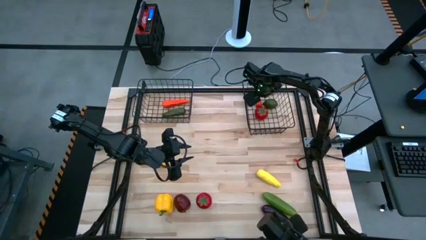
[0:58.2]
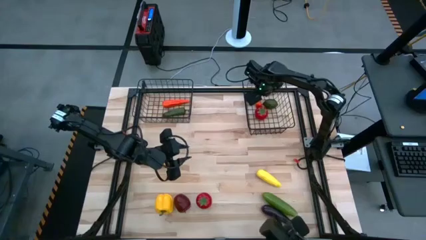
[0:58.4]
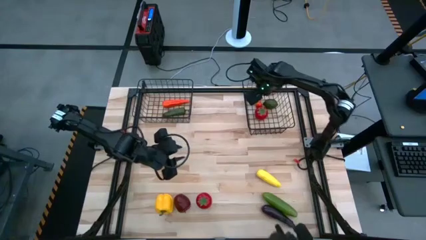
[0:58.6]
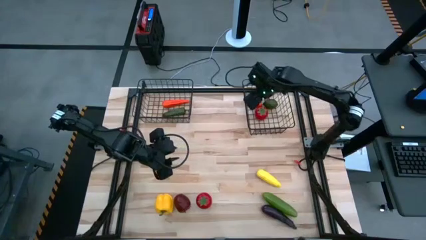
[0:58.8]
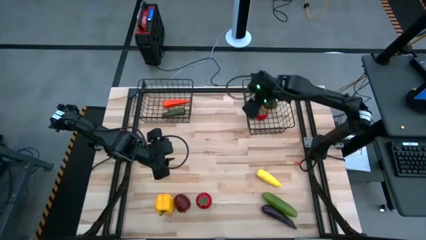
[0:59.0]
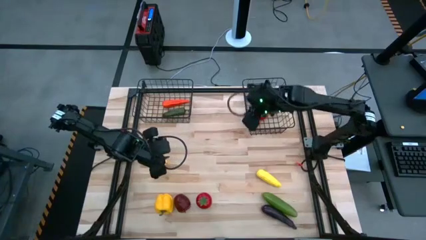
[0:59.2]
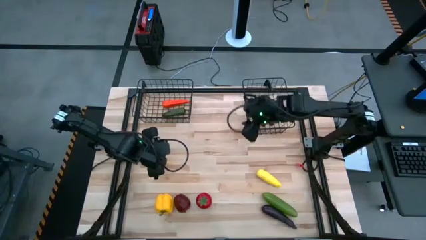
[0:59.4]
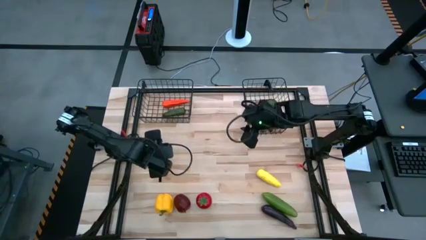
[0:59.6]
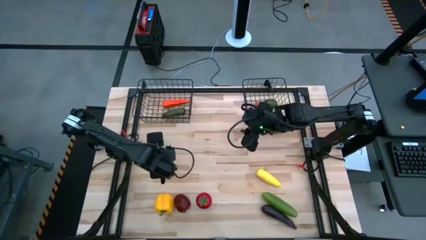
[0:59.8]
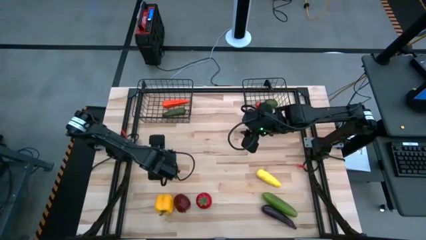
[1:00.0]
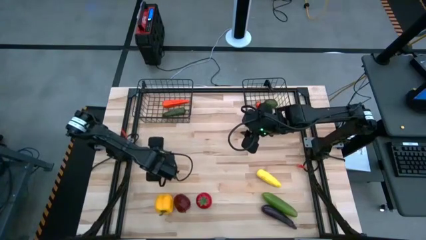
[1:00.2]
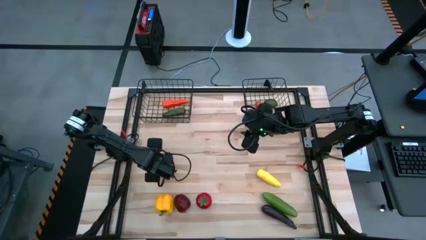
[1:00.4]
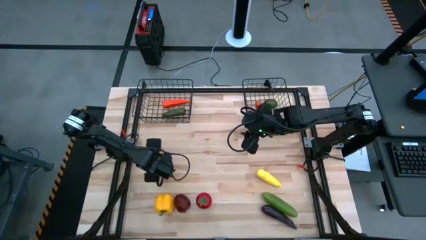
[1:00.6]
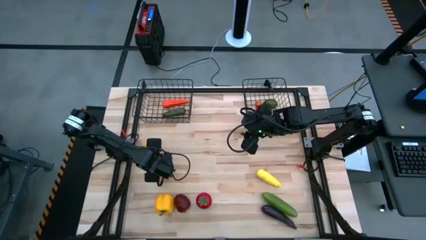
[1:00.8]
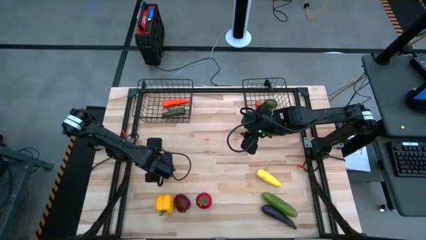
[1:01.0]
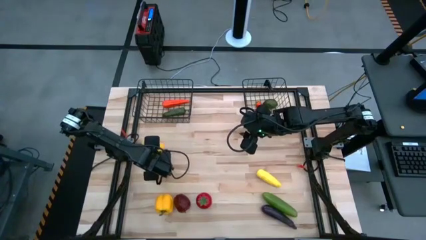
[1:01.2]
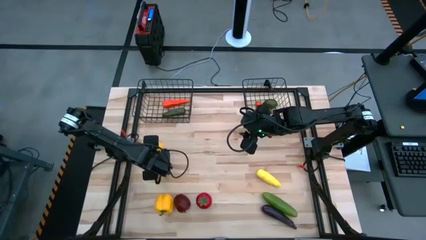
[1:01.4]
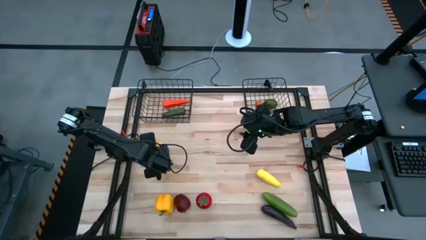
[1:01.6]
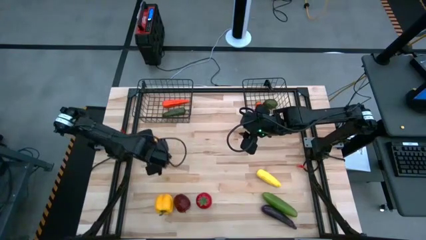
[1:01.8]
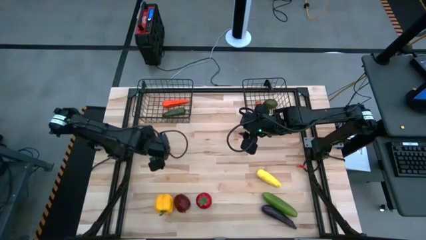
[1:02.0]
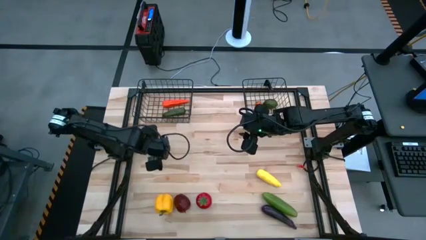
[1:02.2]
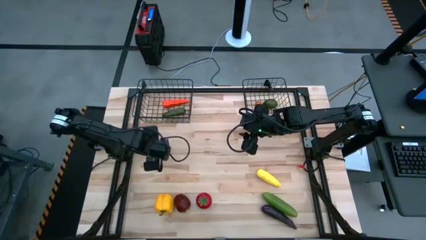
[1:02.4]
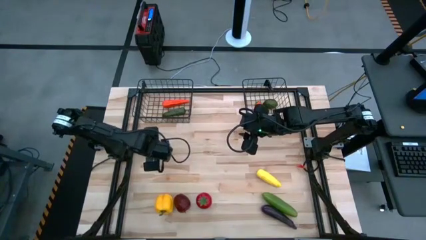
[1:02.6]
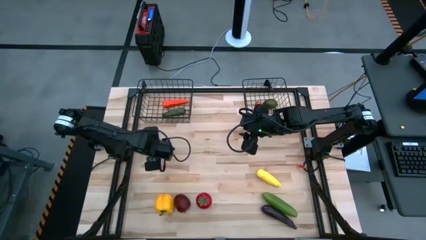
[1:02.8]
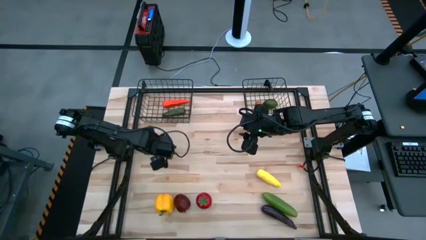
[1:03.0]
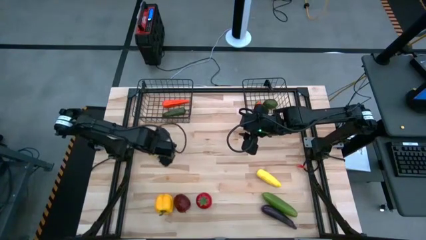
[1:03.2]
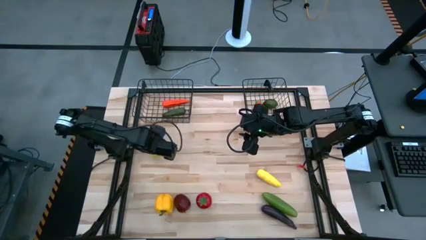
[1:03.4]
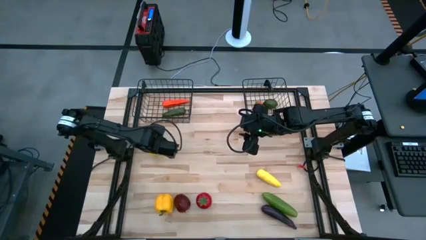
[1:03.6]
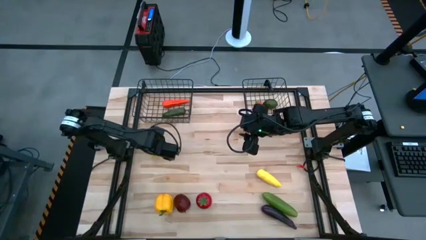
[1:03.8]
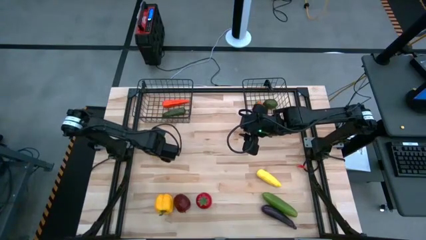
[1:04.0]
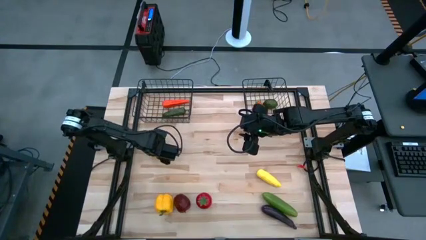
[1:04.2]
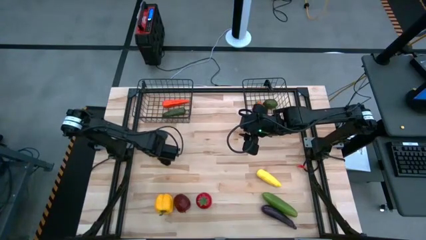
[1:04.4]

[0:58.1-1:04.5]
Task: Sort produce into baskets
Put the yellow lemon into the right black wire basket

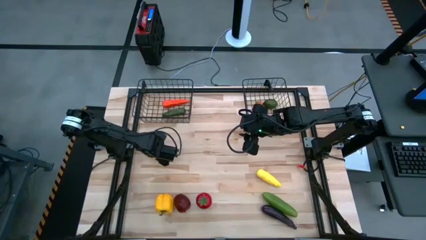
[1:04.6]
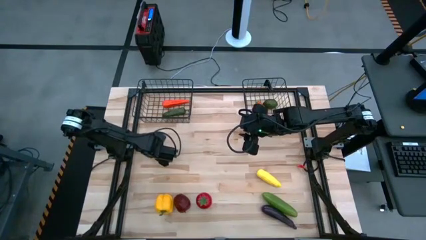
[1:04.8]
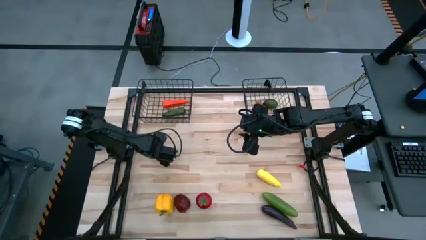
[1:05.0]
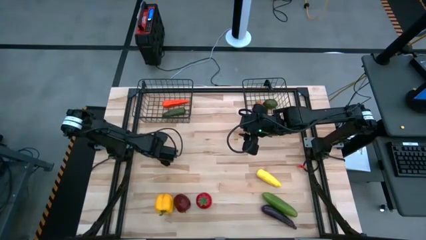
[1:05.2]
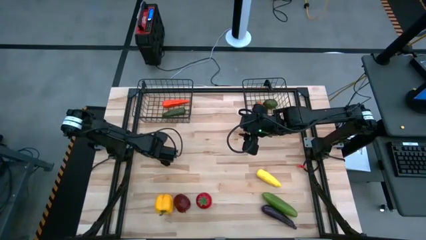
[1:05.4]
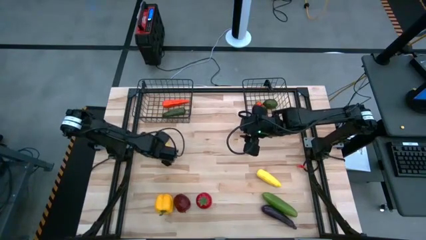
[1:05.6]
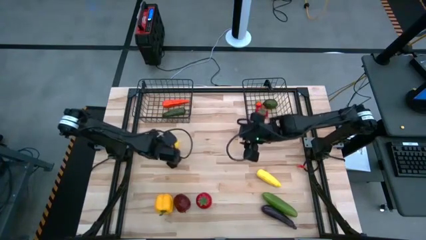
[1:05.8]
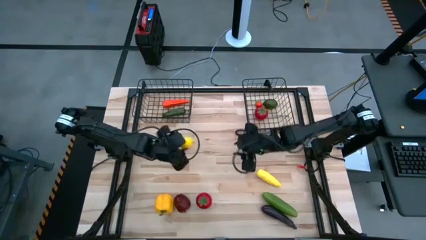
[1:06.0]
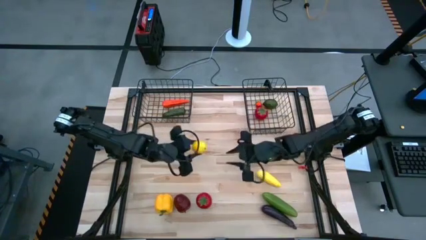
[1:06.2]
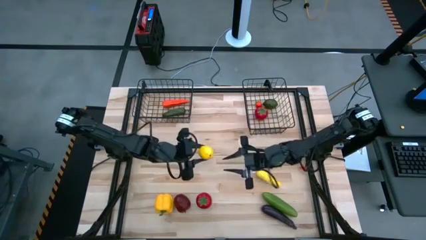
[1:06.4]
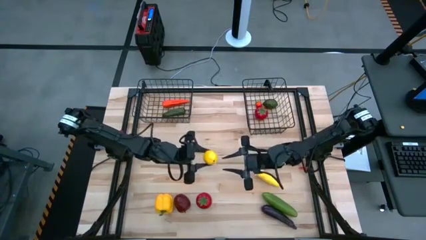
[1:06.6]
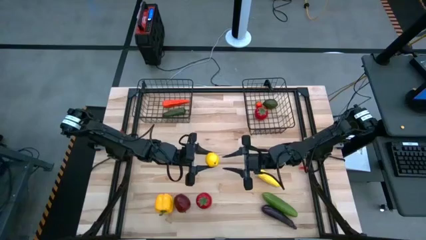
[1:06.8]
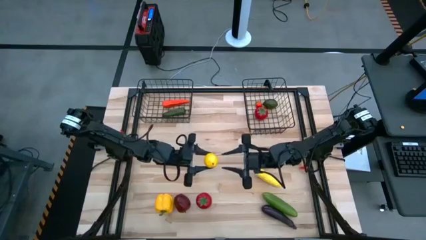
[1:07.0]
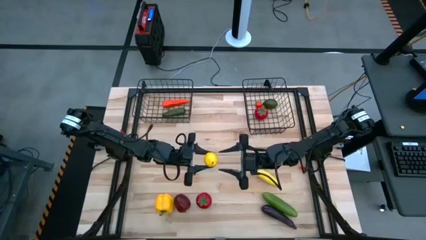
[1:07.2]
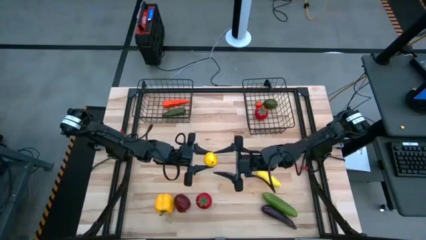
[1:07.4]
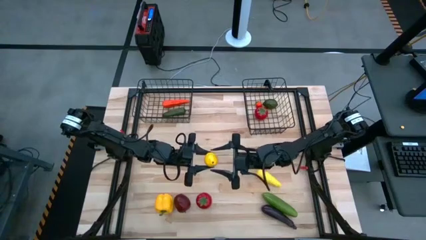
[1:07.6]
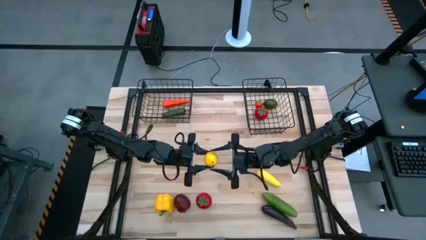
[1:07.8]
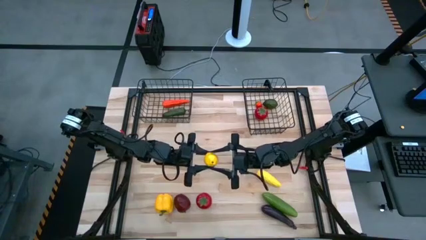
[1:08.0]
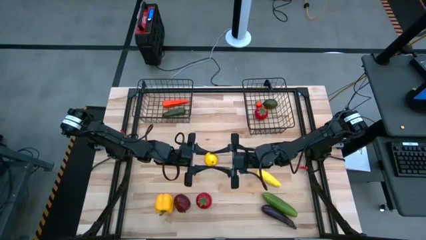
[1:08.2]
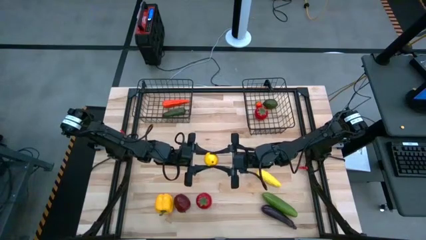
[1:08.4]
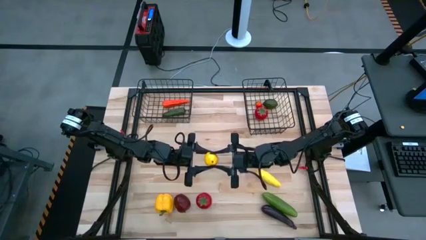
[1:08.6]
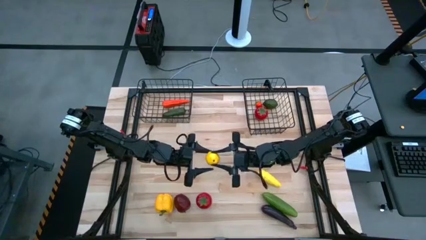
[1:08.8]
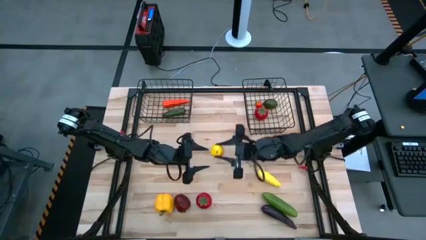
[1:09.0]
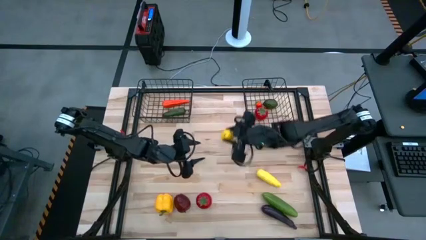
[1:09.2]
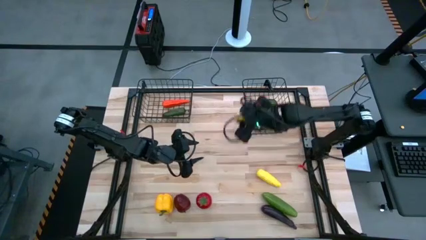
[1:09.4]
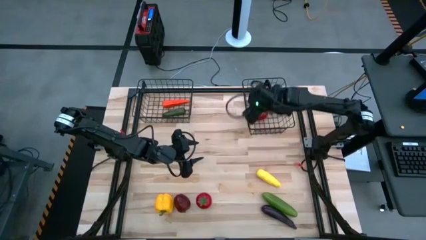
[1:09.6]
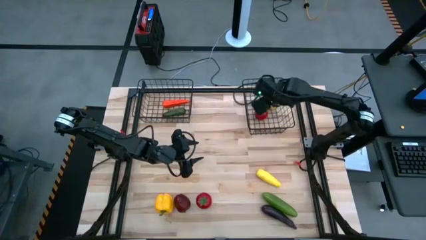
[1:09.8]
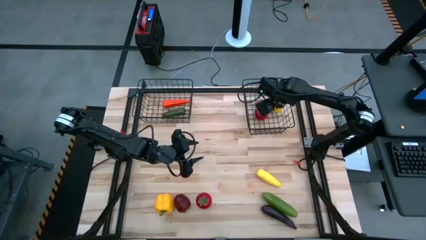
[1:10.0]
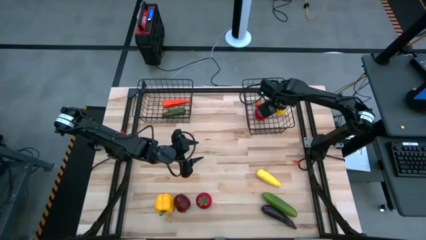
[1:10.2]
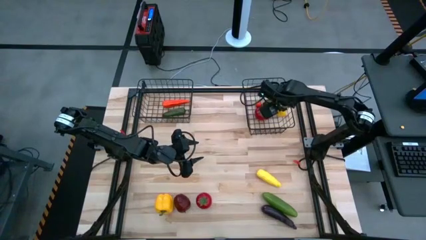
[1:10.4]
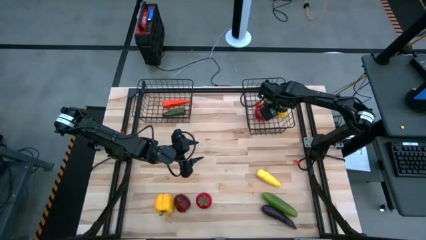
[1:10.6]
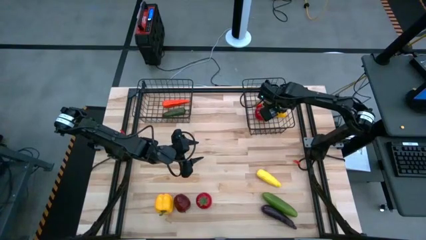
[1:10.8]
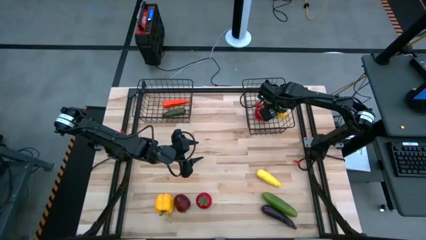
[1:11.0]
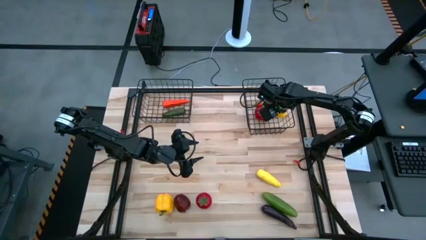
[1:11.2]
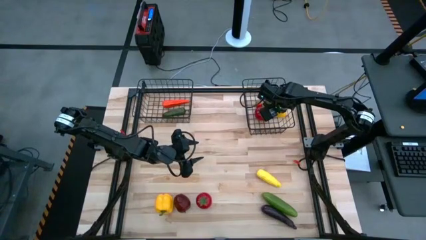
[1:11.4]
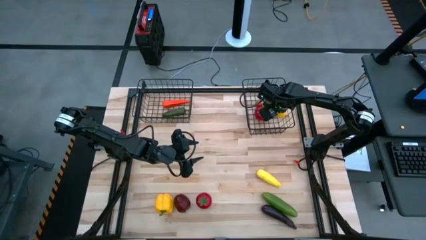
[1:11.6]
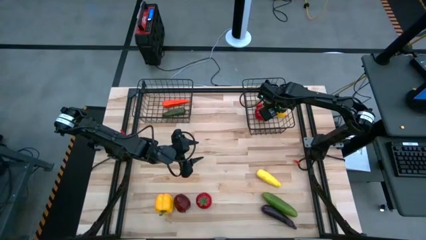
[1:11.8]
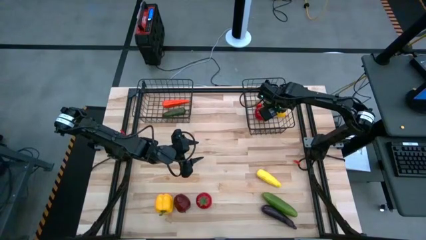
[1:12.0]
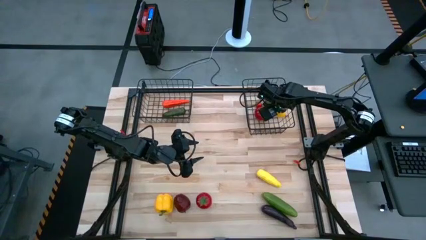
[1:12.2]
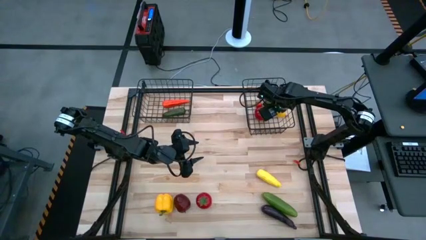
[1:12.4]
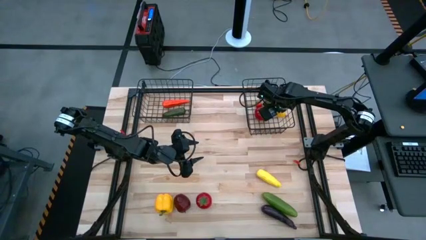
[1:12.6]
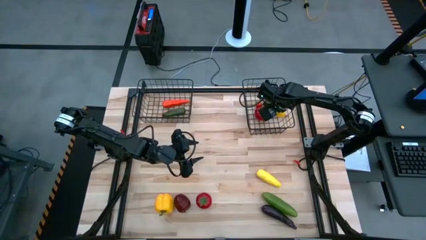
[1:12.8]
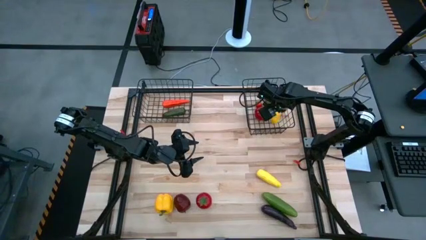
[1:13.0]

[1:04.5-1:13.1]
Put the yellow lemon into the right black wire basket
